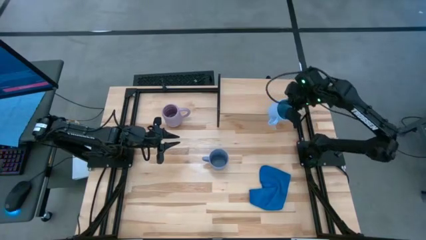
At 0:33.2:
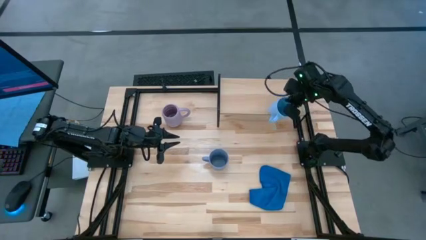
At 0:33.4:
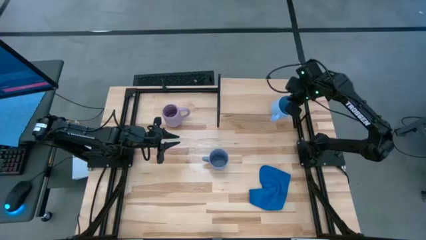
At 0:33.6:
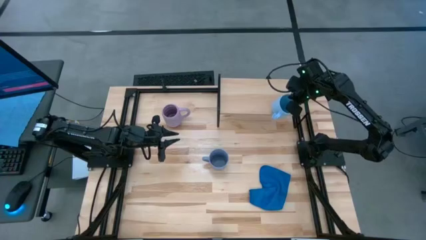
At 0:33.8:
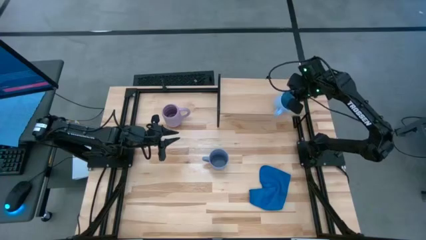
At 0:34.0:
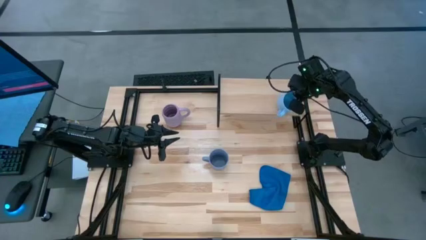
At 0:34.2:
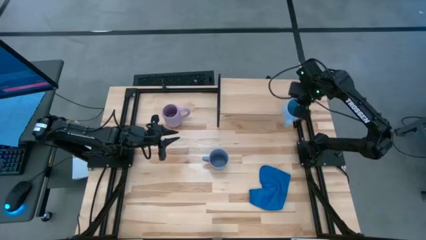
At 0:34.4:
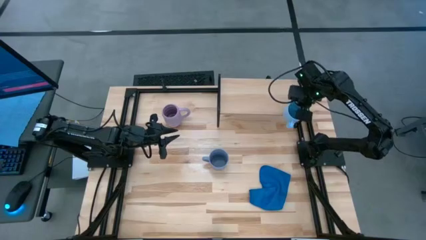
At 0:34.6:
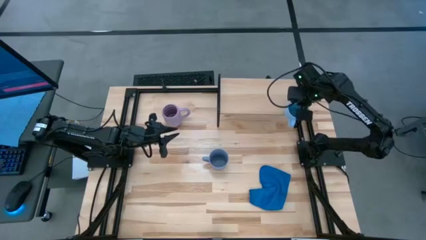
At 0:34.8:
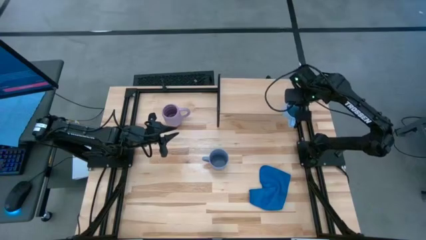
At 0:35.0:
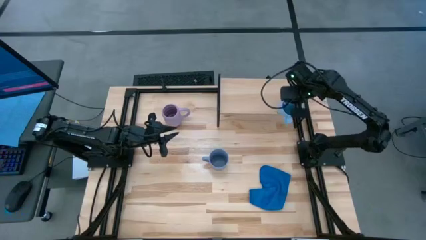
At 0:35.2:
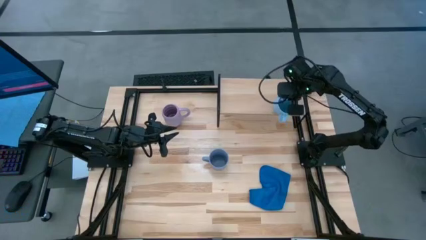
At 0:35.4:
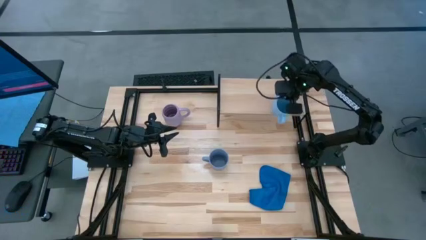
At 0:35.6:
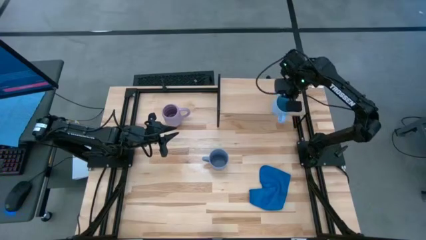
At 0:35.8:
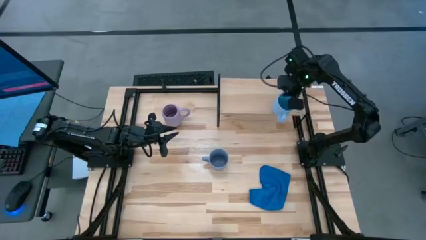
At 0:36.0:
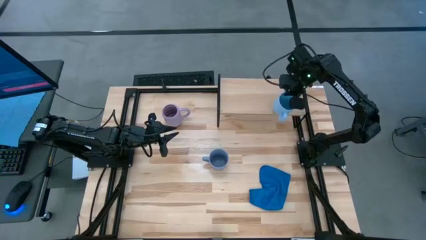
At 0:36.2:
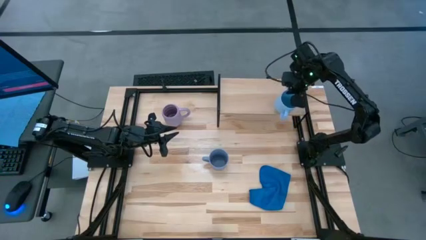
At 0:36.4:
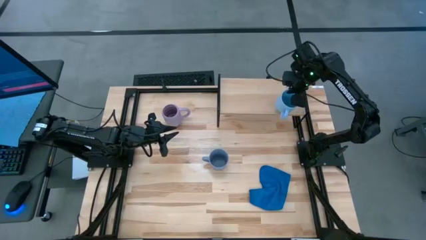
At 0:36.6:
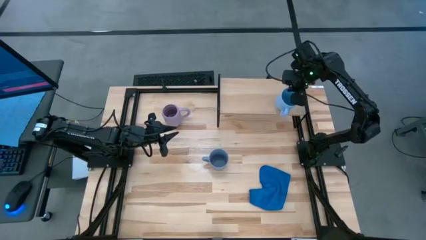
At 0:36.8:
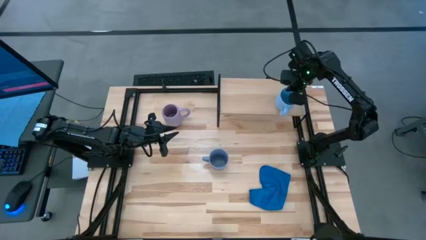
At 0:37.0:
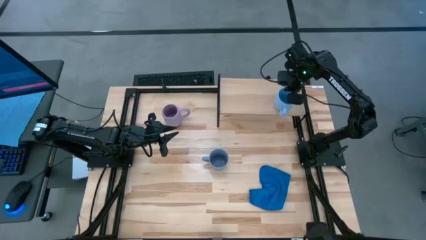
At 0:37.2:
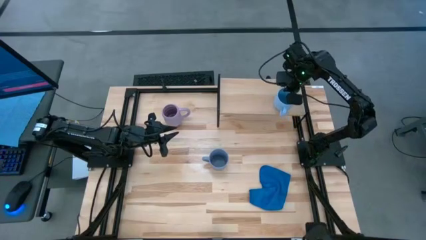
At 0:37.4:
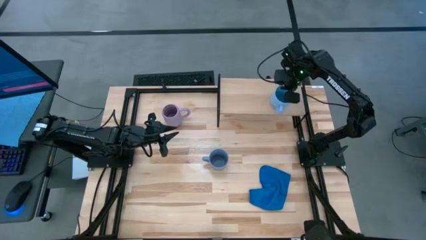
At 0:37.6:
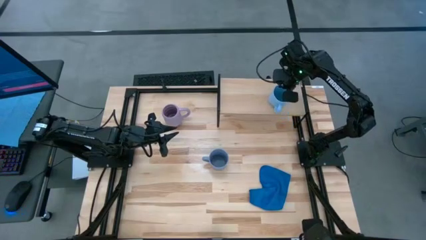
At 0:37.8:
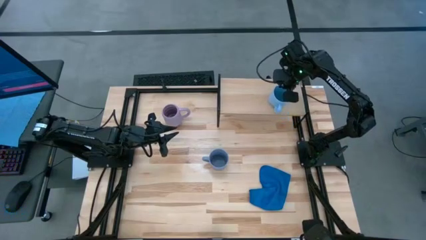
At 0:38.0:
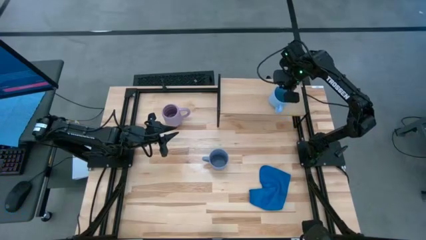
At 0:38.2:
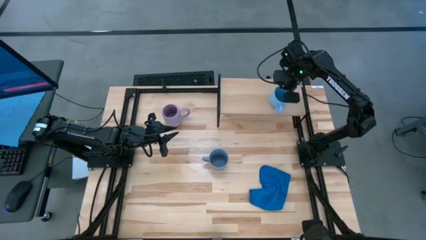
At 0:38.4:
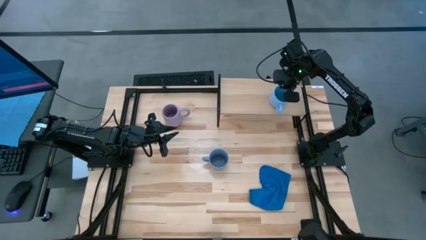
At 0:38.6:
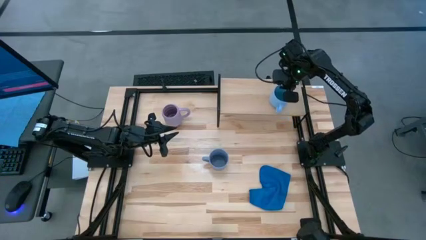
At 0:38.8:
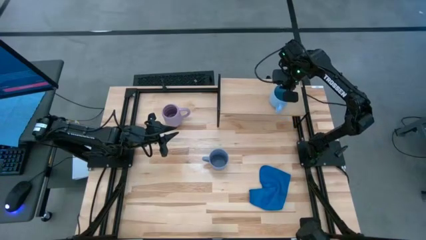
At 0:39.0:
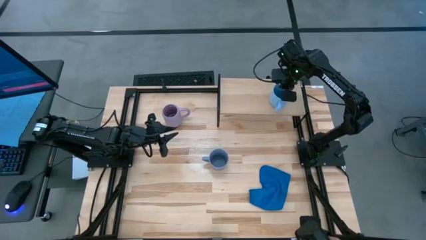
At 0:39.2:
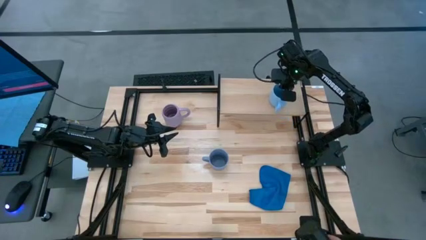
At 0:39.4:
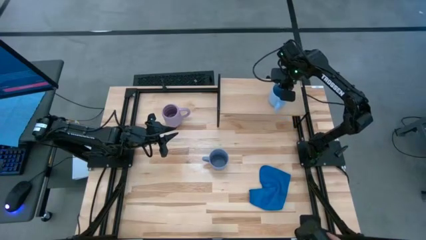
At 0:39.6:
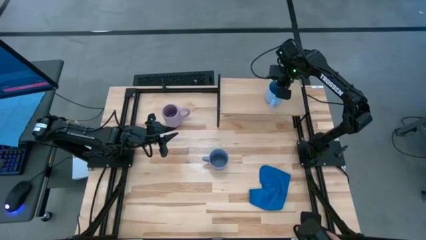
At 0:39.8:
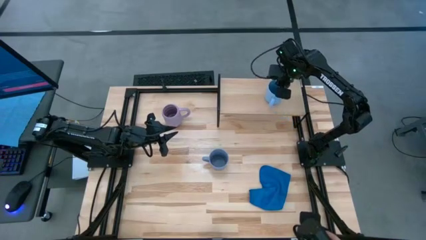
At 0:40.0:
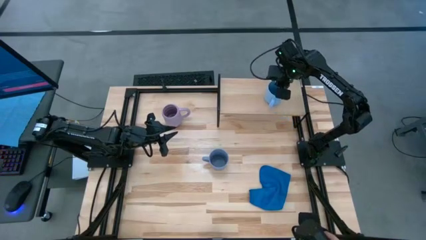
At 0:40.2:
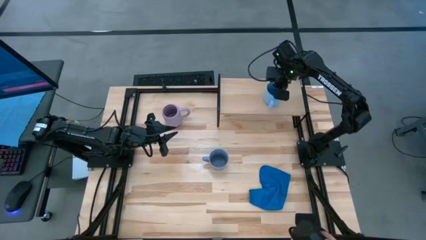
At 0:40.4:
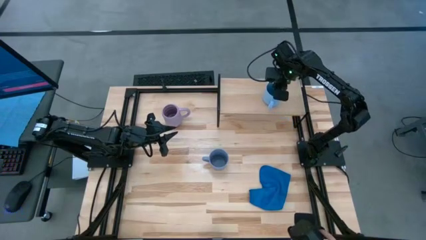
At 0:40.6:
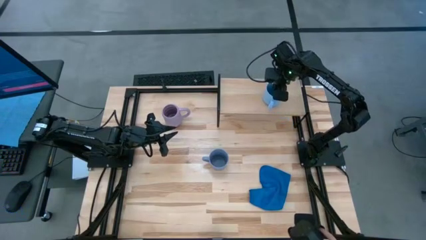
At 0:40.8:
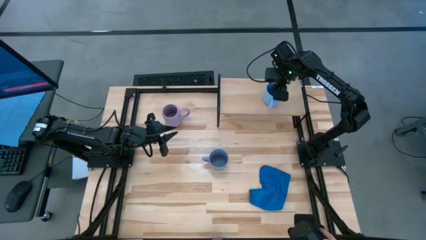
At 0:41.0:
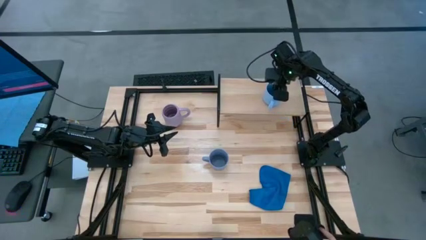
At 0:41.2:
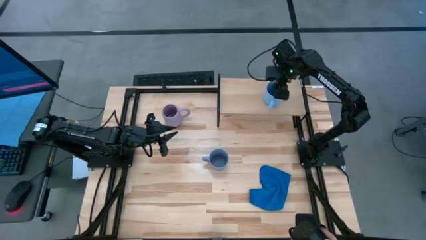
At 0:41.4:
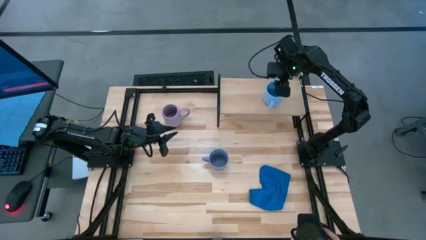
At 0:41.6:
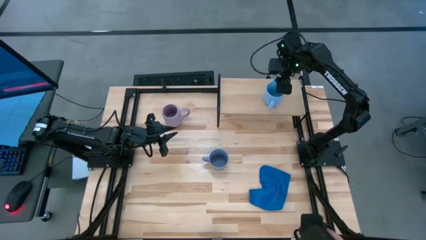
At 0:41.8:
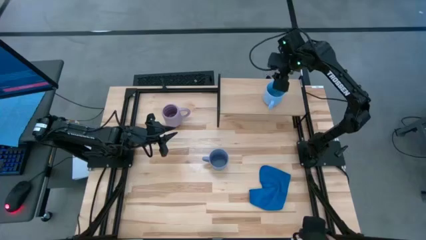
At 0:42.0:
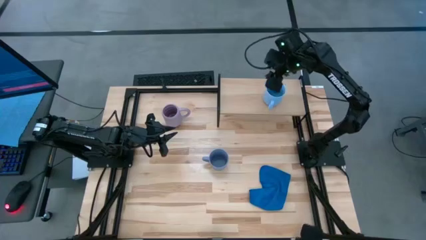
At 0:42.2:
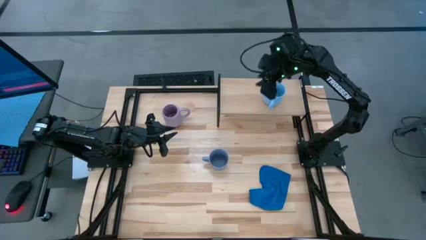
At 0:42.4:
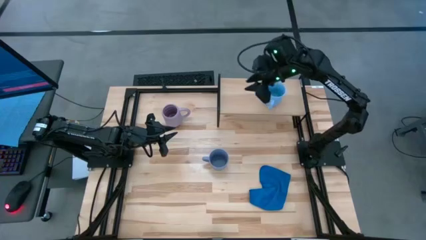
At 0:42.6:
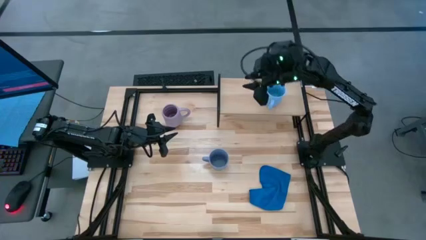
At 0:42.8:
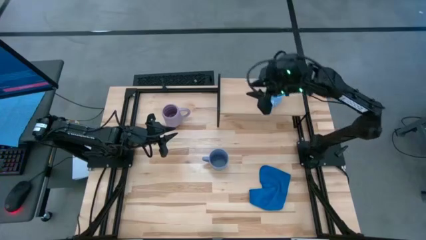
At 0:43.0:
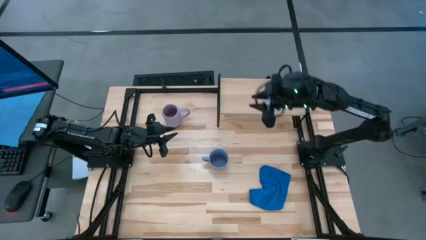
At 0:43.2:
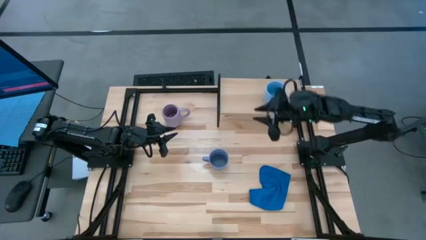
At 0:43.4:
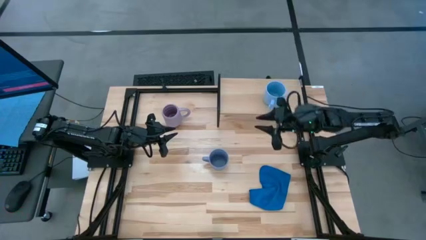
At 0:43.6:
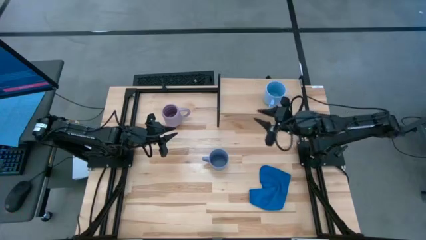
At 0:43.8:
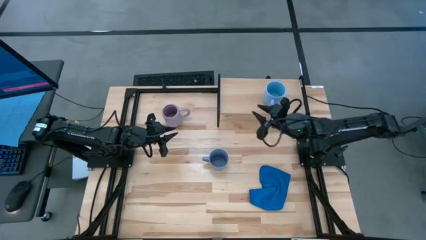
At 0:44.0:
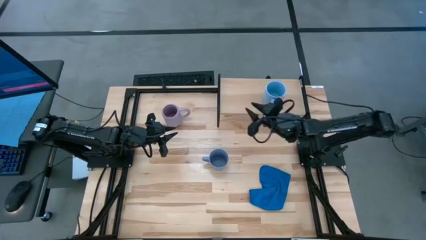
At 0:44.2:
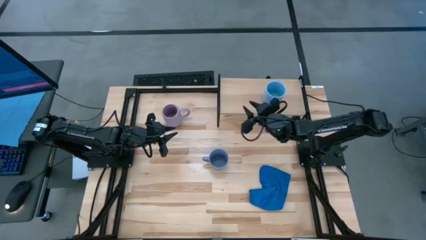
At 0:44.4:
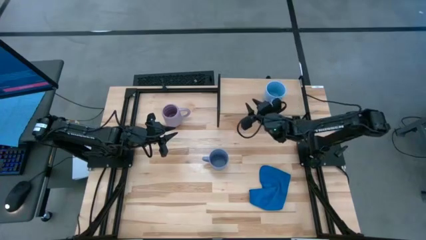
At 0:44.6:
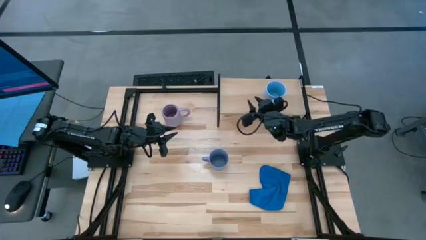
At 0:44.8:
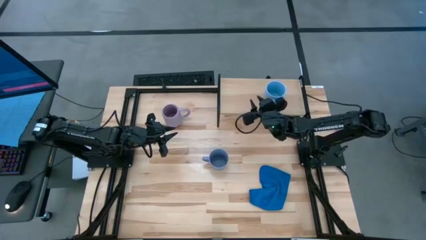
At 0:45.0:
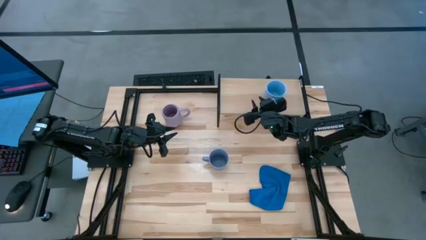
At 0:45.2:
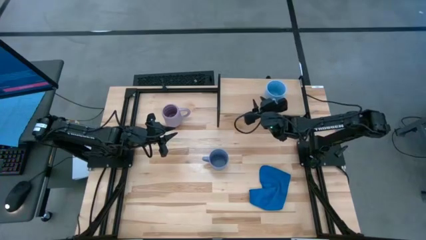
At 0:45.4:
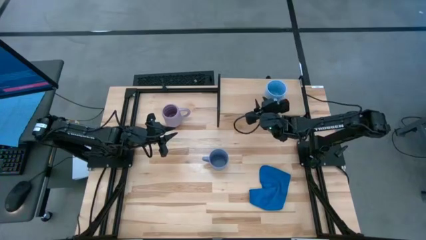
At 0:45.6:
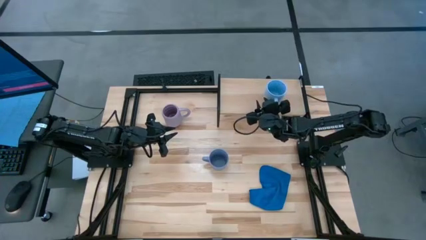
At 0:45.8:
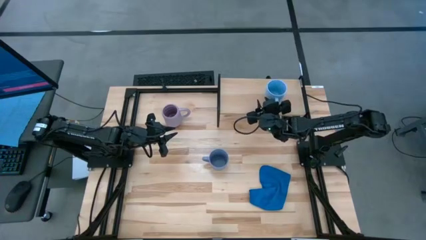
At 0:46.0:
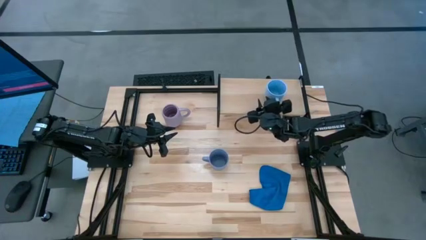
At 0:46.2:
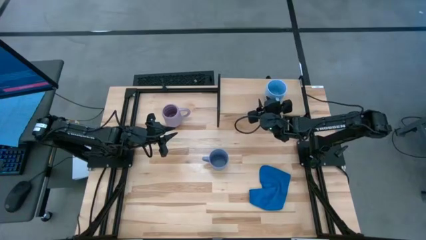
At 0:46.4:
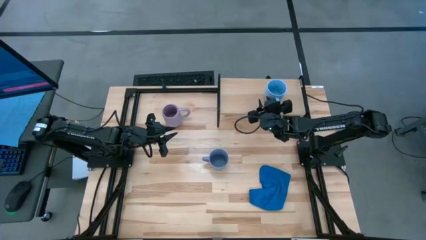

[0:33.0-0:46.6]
Task: Stack small to large cups/mugs on shelf
Put the light blue mug on the shelf

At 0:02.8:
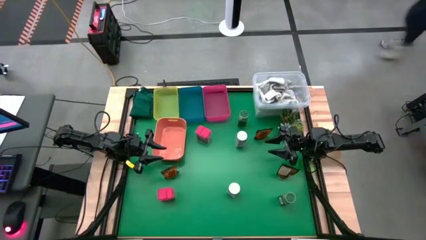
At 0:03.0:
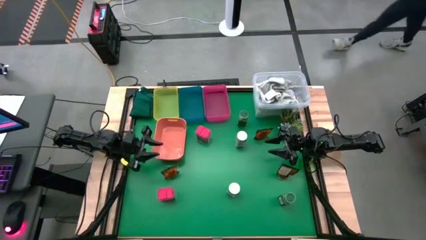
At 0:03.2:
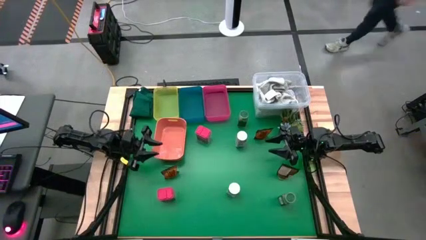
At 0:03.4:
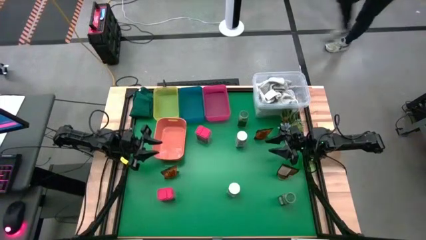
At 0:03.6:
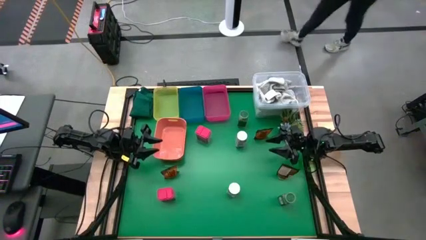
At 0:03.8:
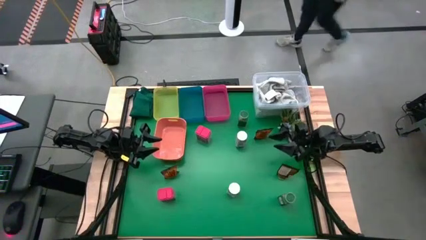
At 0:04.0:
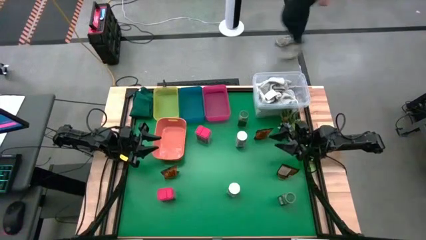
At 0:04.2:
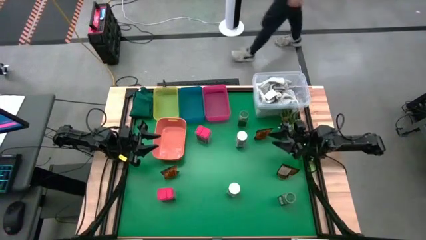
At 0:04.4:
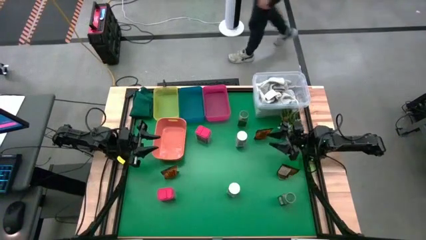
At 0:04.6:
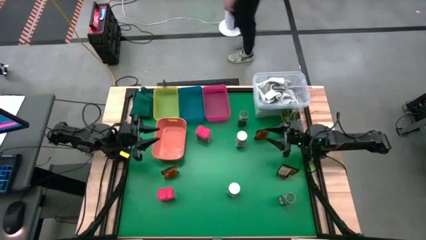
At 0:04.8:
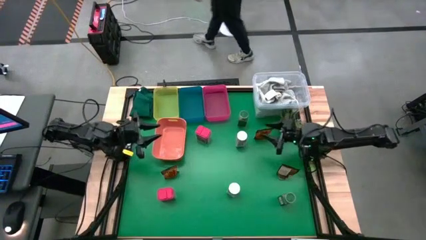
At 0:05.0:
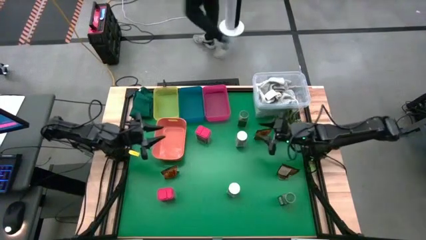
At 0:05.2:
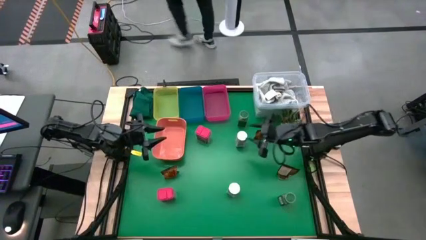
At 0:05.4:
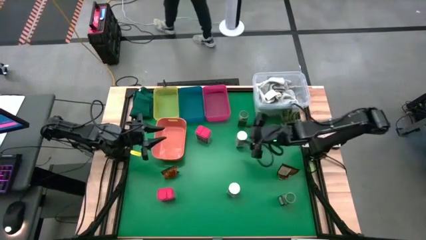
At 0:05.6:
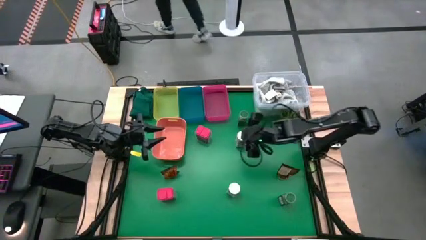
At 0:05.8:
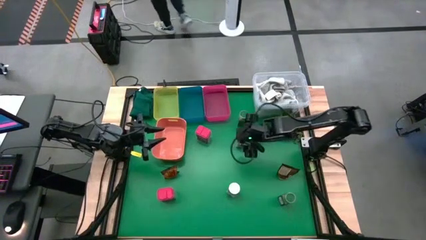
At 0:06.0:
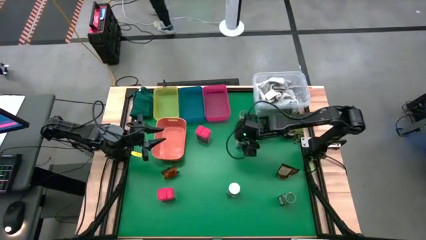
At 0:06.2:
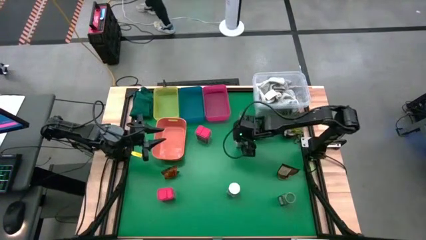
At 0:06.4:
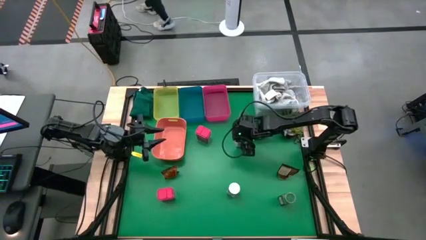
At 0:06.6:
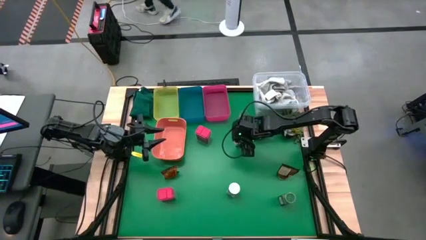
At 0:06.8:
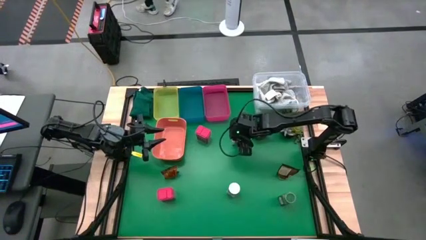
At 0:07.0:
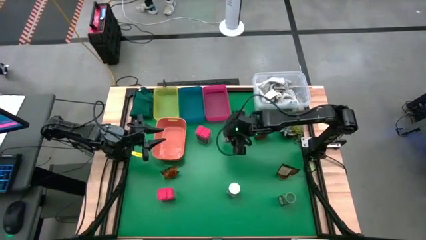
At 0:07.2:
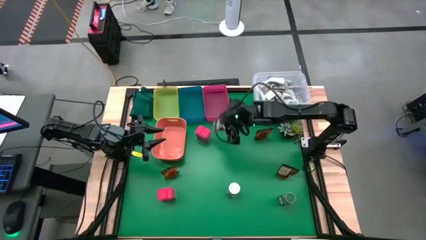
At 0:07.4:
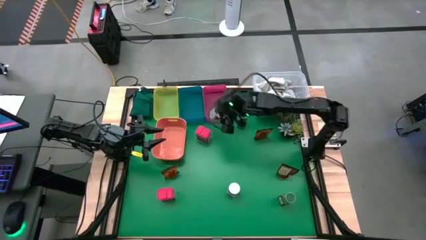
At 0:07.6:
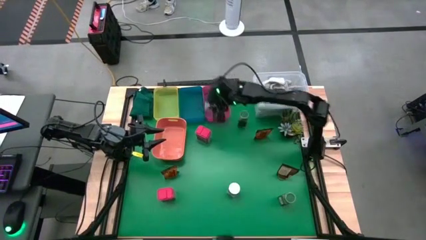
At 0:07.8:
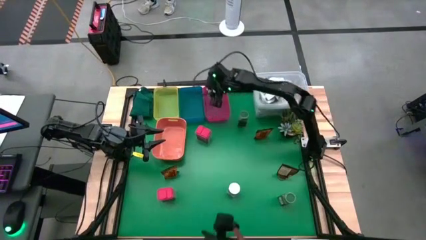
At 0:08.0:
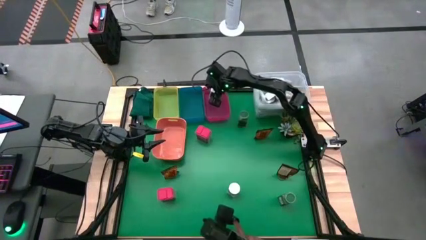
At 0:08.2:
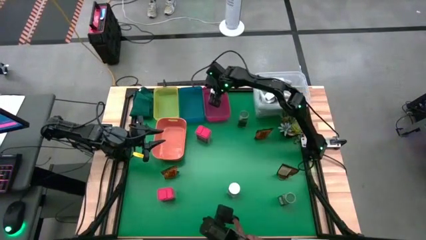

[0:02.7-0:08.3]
Task: Sort spices by type
Put the top white seasoning bottle into the red bin
